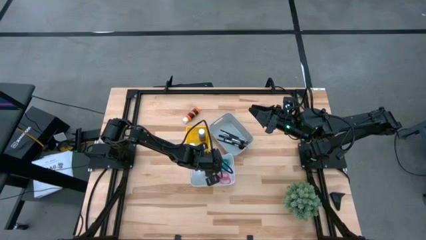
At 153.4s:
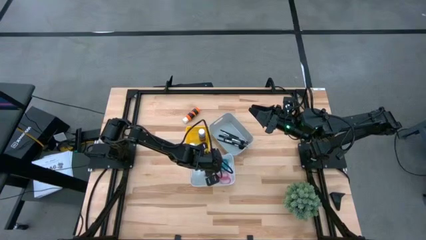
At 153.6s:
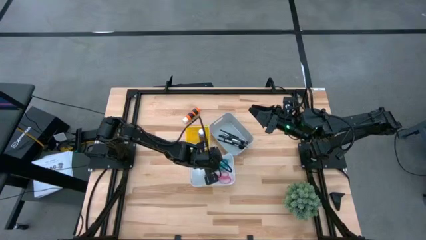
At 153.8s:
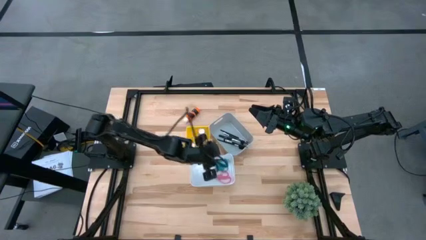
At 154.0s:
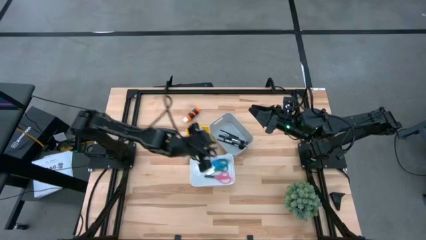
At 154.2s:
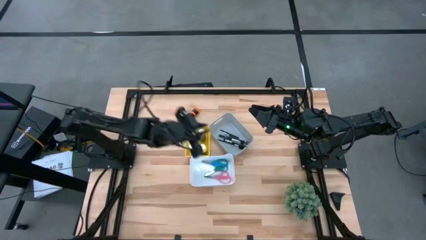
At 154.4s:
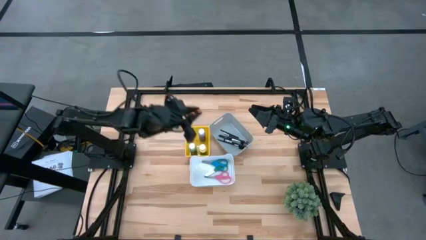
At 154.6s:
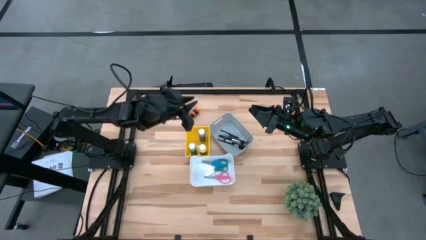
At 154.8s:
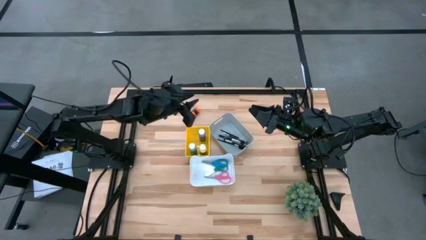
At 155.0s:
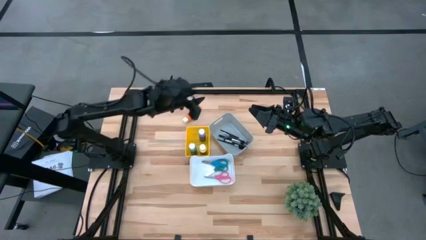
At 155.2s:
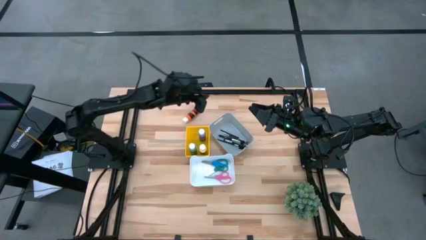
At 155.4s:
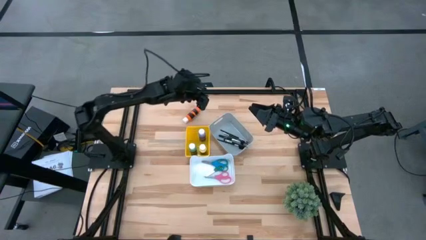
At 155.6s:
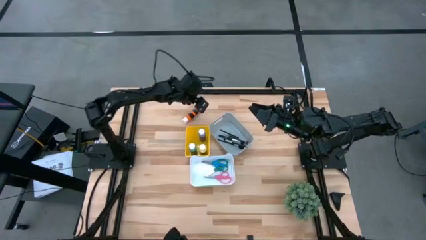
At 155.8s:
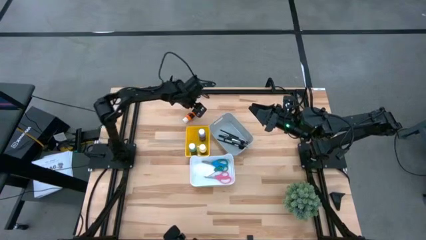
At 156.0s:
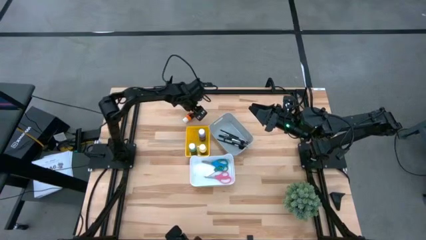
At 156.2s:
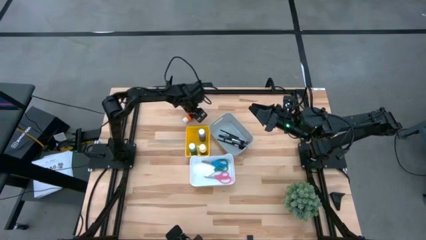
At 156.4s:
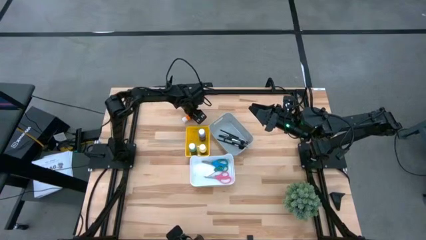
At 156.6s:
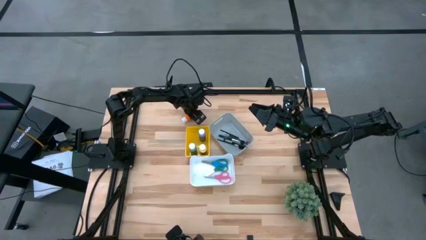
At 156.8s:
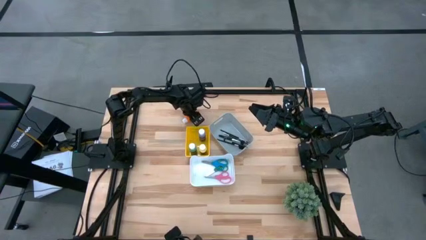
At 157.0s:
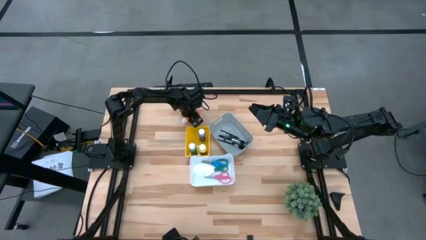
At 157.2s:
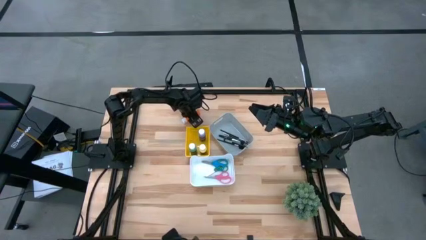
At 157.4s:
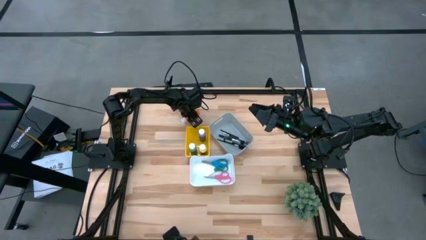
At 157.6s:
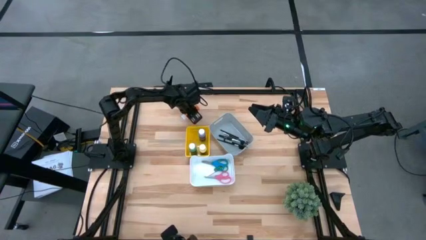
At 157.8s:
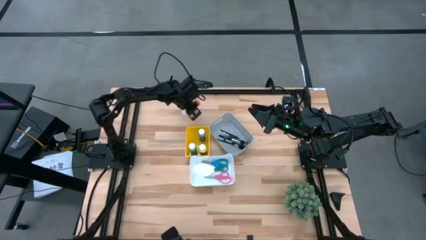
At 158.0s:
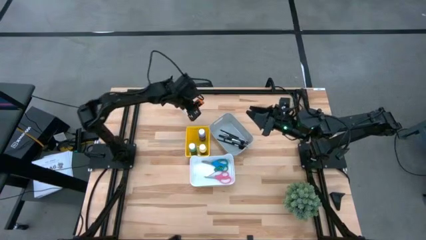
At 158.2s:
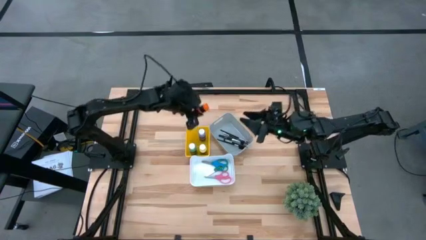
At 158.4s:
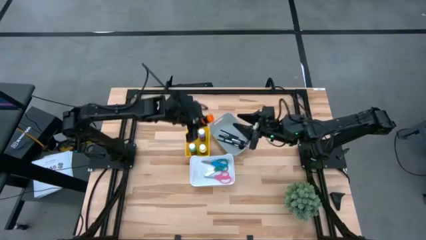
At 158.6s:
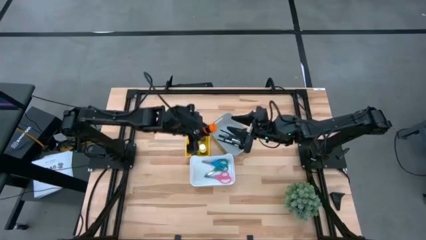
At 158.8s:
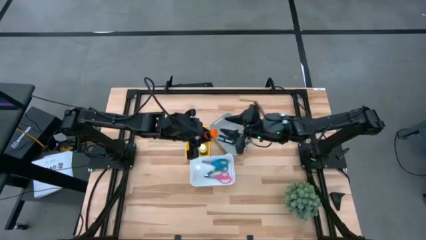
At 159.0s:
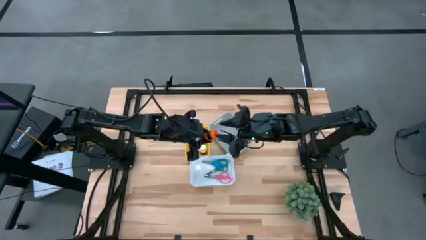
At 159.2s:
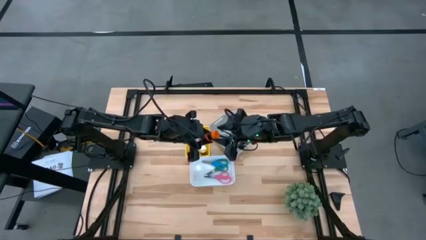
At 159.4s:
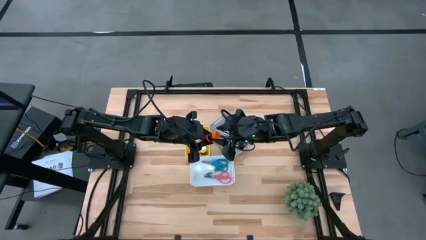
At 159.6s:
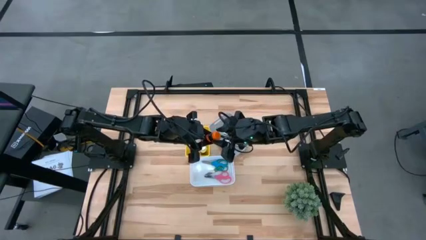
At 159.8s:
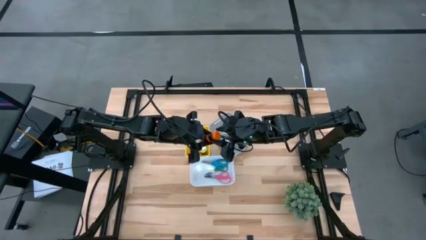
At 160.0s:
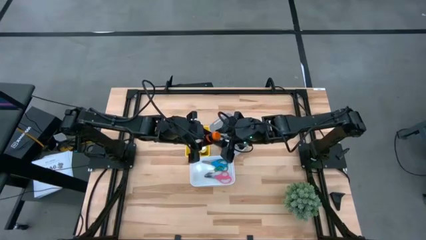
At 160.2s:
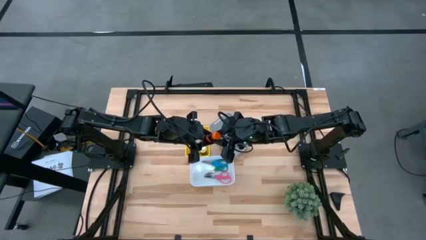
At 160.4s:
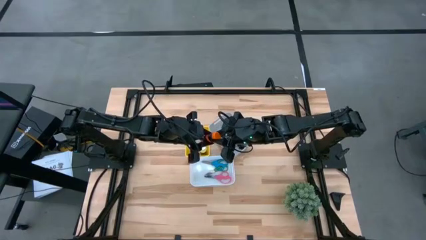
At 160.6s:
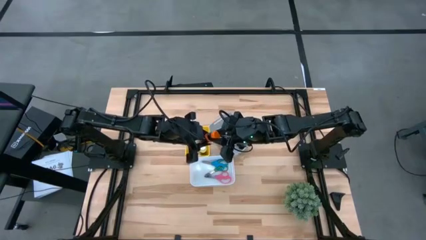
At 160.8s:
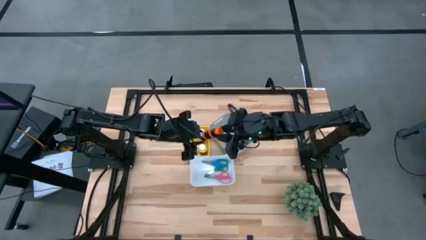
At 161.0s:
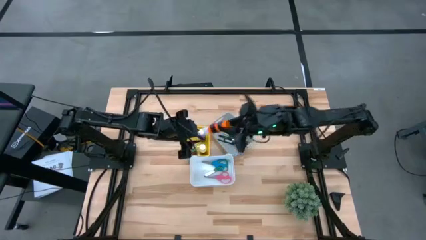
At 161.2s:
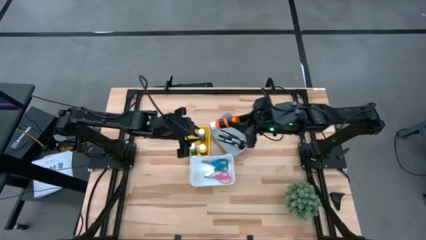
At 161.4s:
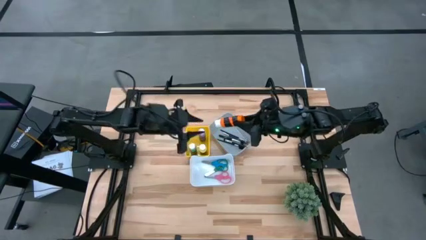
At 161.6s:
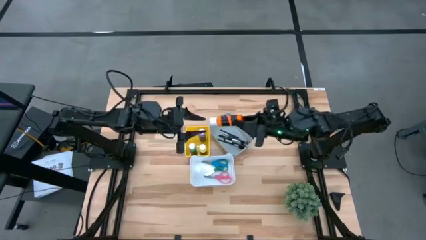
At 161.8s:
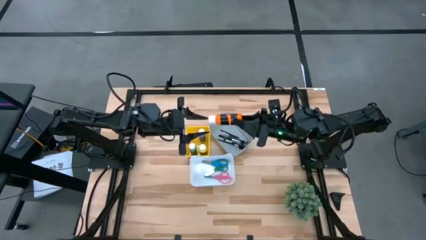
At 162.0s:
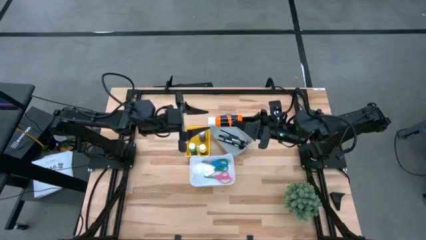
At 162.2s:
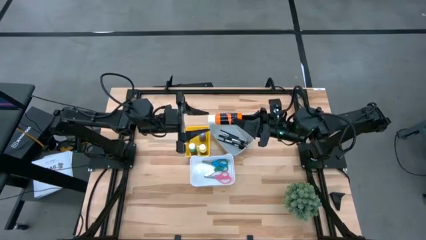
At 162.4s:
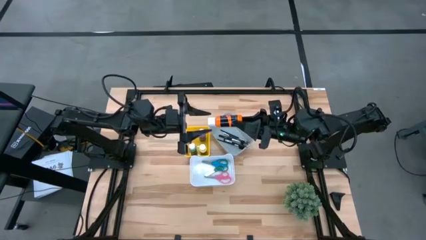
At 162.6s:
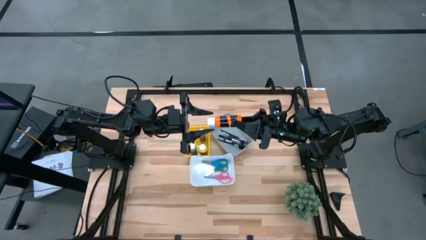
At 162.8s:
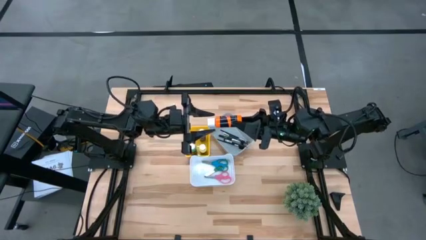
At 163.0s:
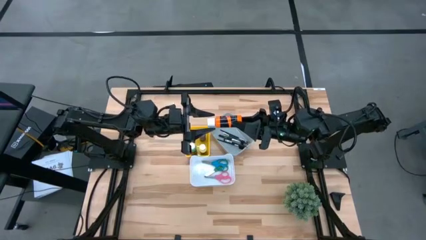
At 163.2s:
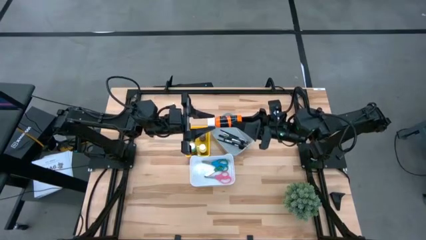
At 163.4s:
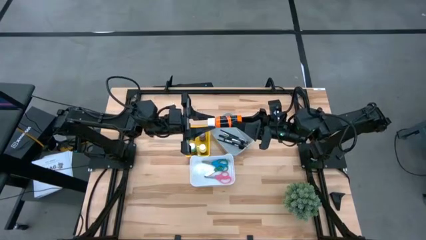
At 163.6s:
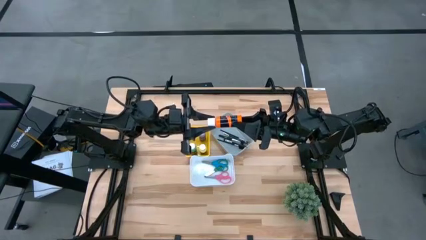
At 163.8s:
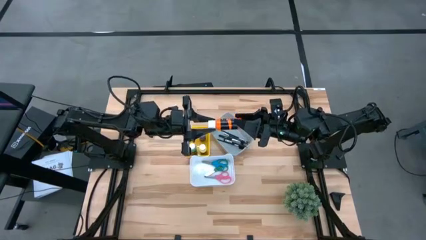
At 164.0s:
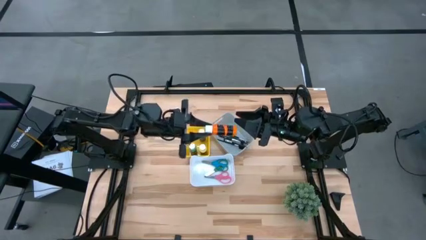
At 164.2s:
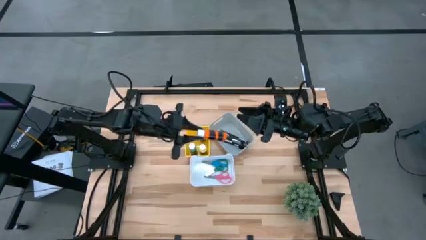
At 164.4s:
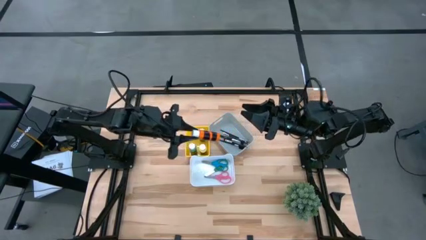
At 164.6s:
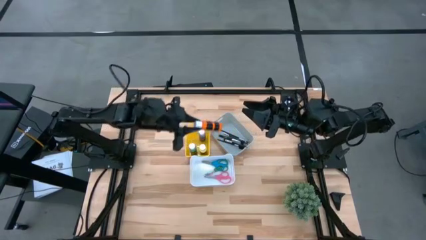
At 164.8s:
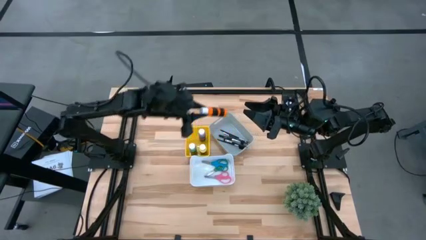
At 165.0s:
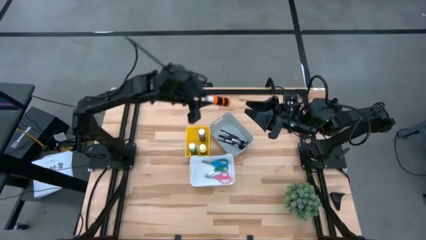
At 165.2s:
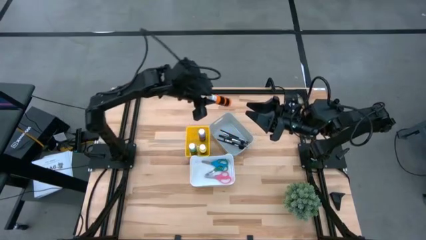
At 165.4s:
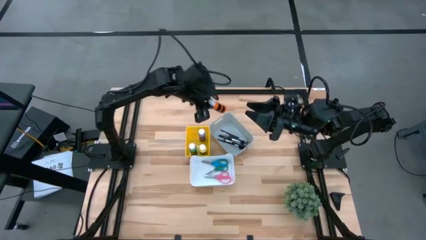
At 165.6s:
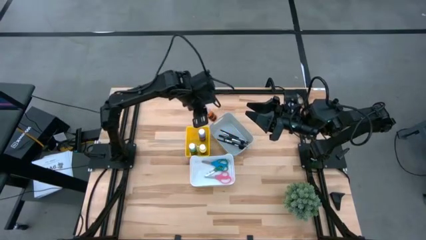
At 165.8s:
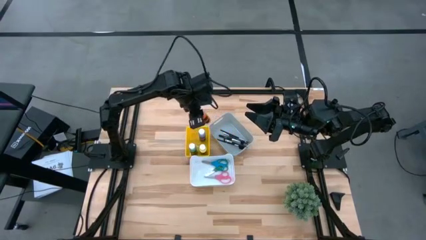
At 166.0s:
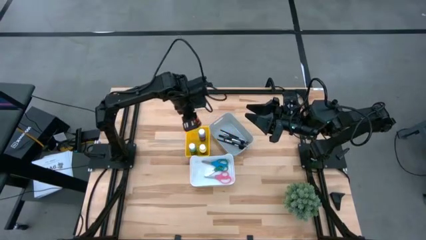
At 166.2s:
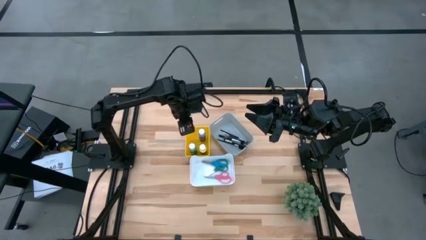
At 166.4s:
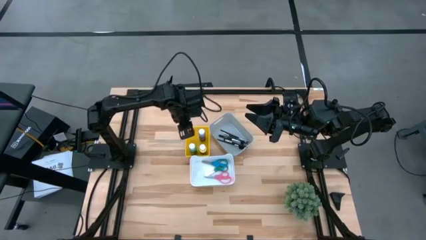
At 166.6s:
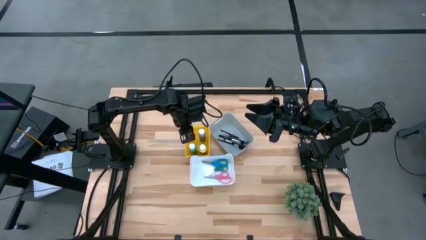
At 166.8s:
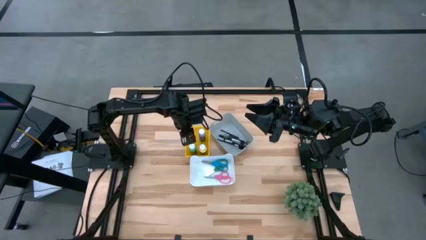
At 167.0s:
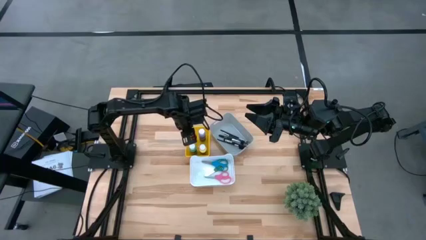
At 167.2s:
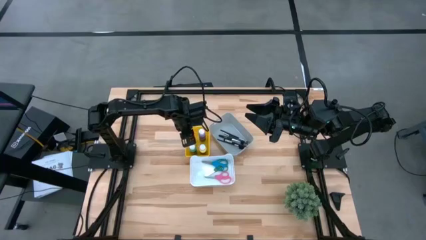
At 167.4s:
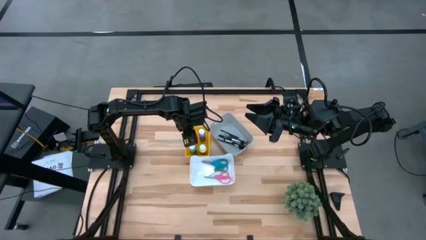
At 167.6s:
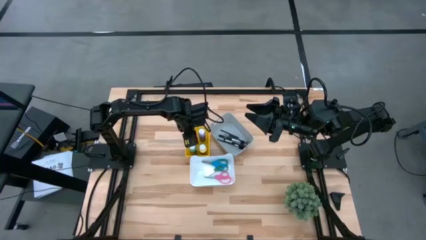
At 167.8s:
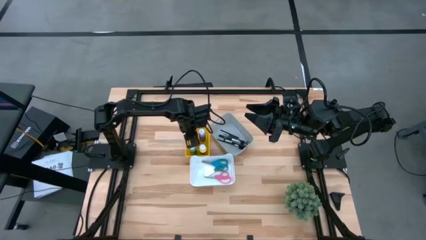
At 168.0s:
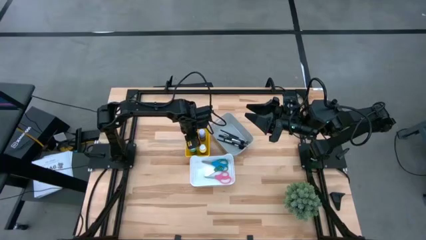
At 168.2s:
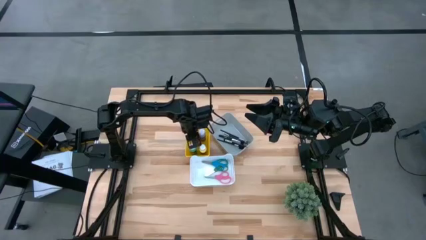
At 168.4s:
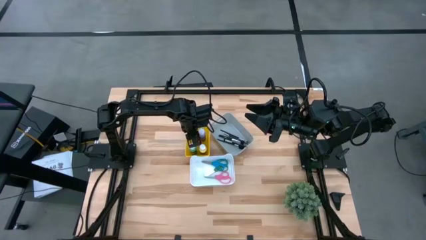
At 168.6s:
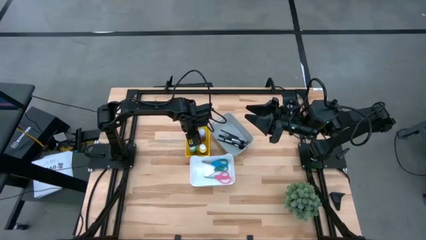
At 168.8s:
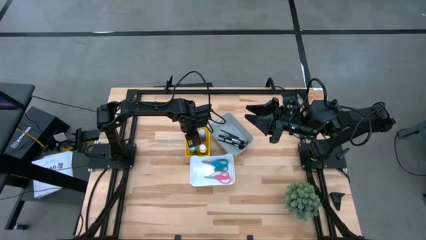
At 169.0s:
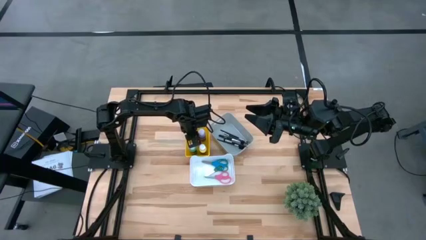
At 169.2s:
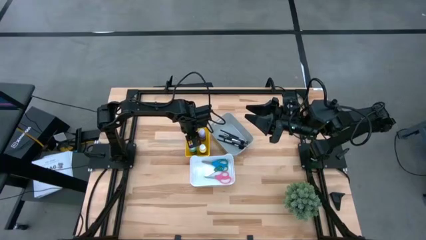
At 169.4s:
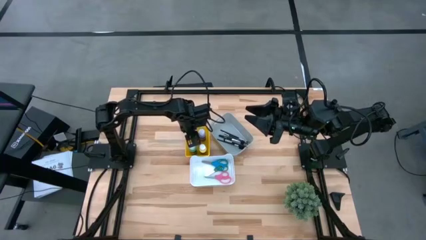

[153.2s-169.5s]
Task: Pick & Place Paint Supplies
Put the orange paint bottle into the yellow bin
